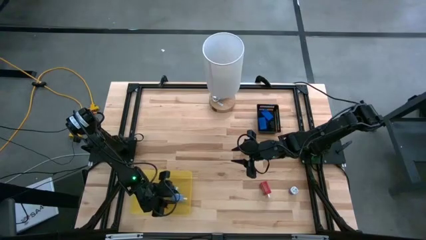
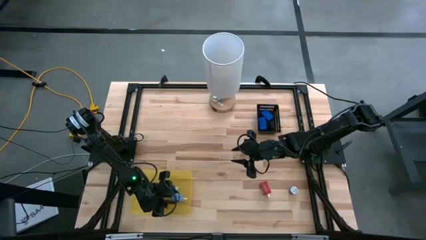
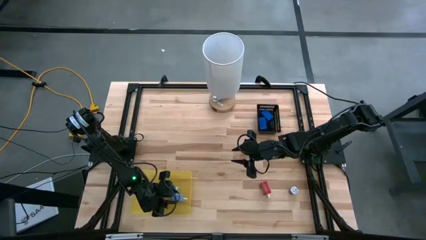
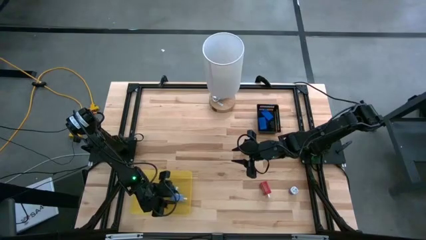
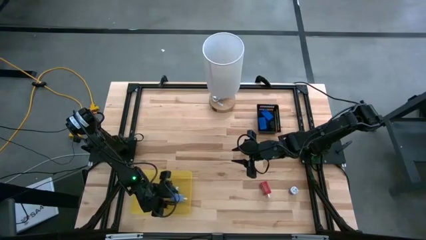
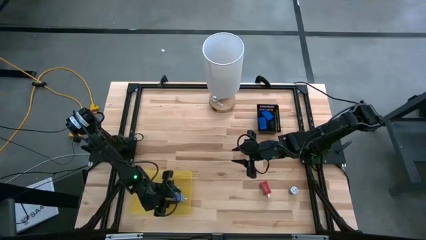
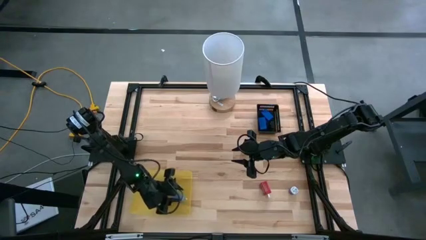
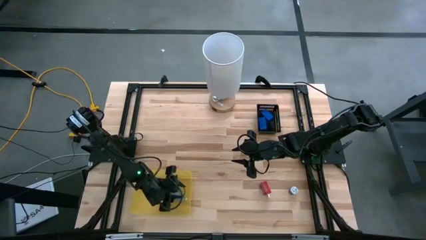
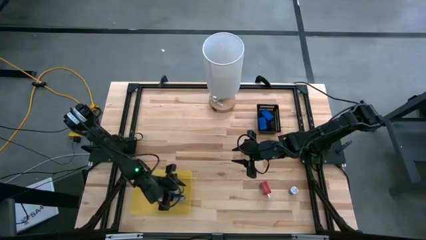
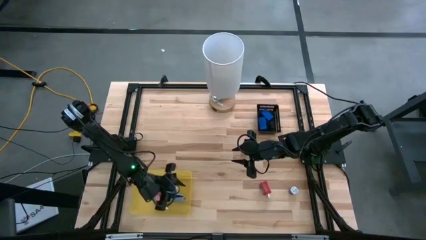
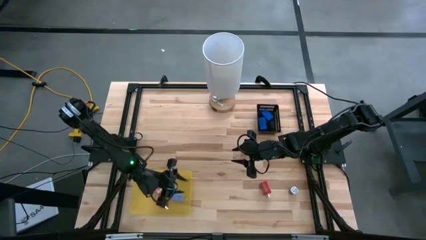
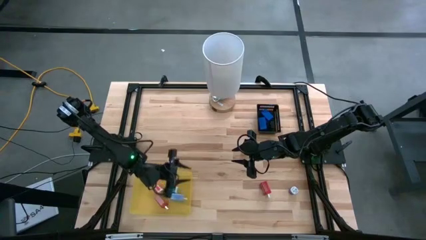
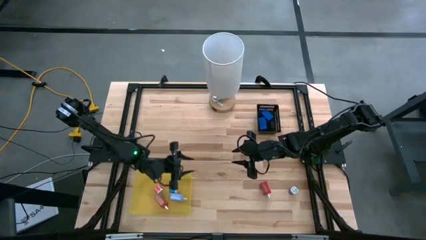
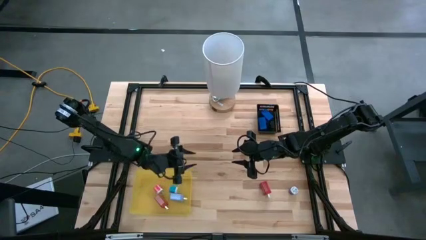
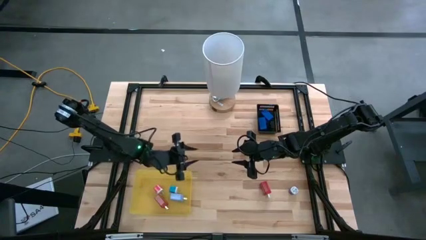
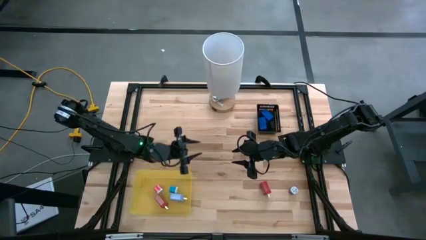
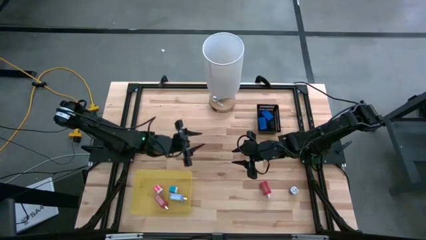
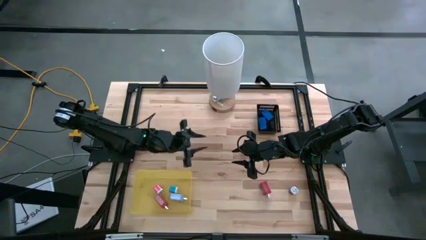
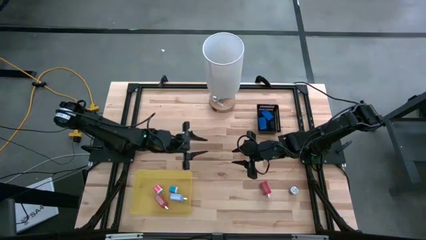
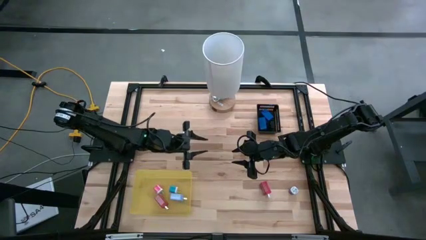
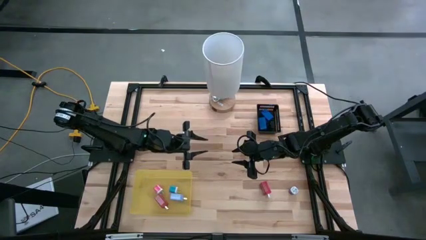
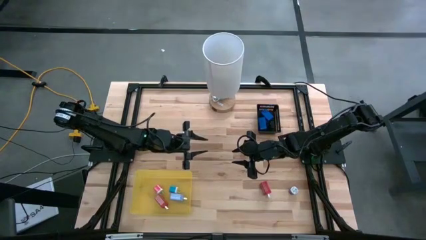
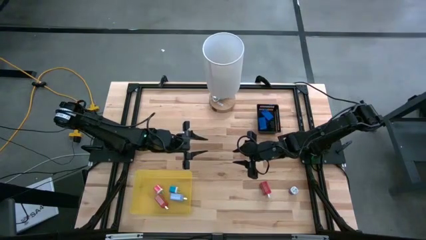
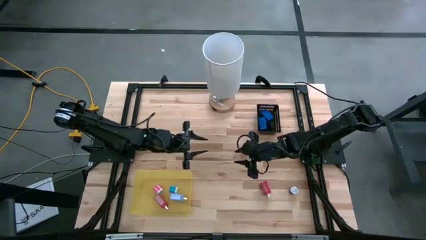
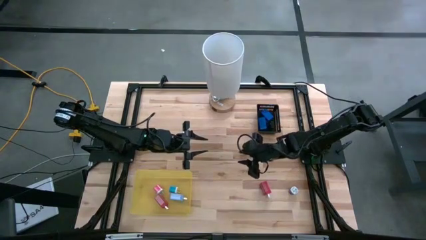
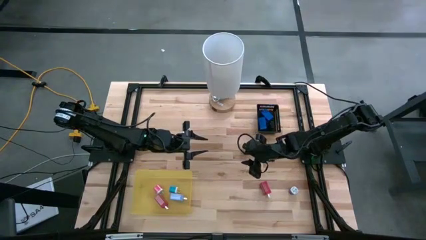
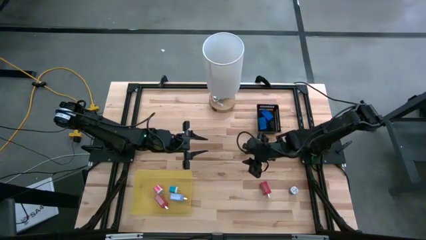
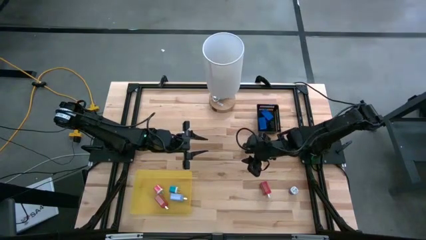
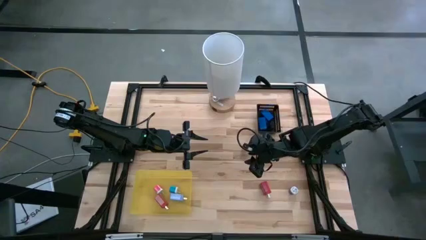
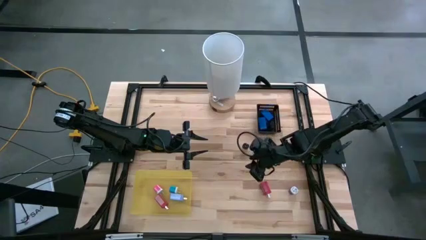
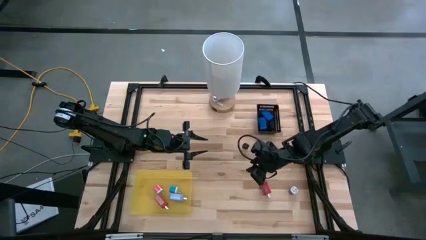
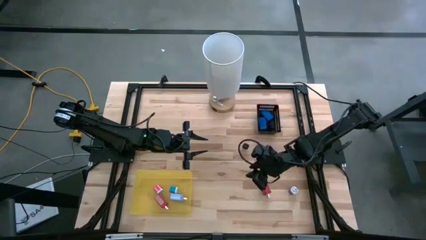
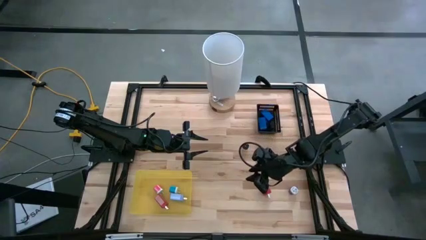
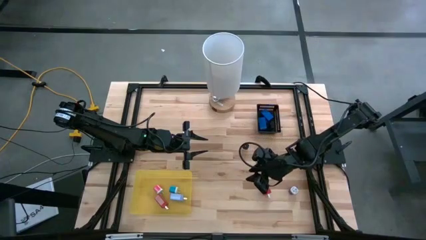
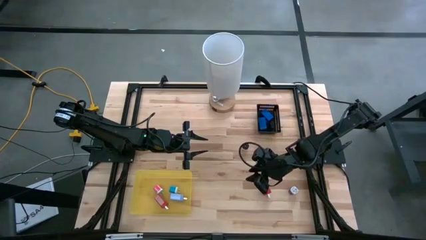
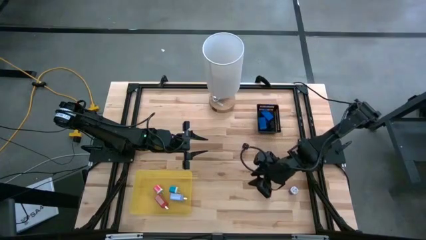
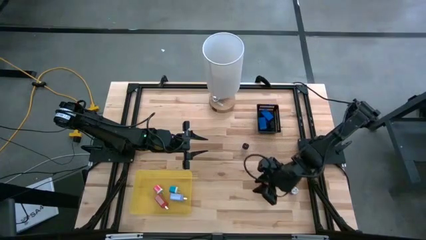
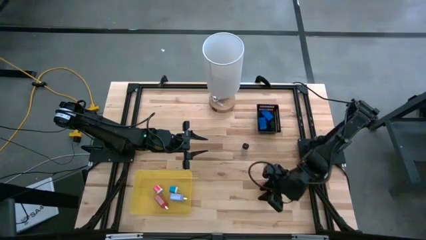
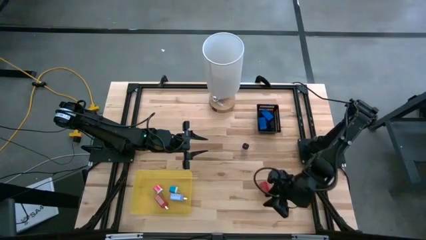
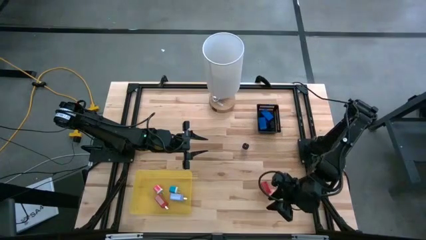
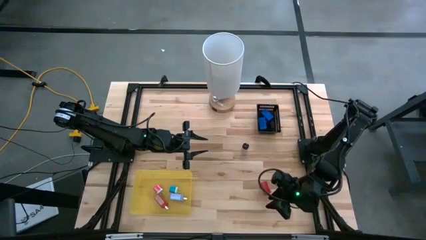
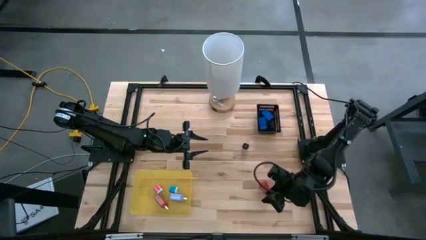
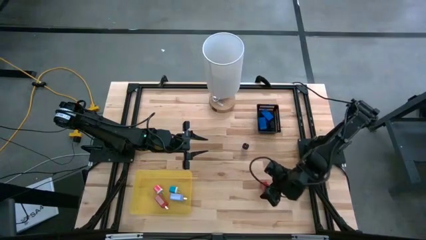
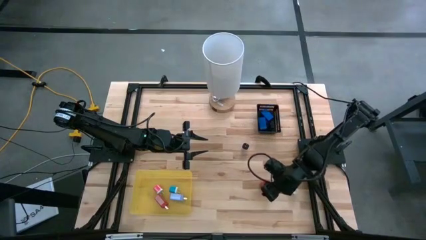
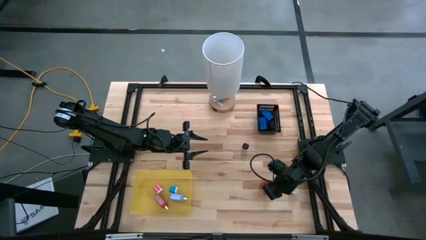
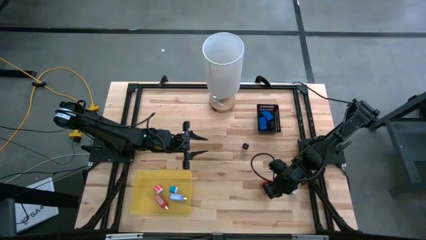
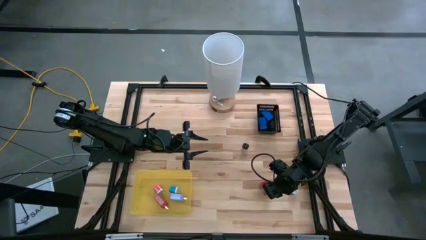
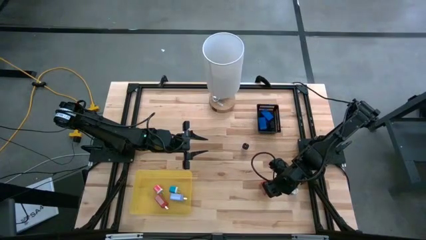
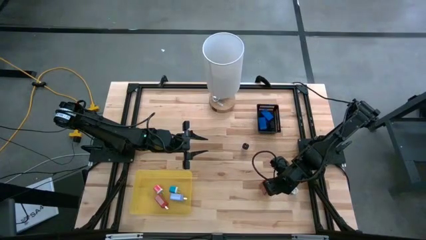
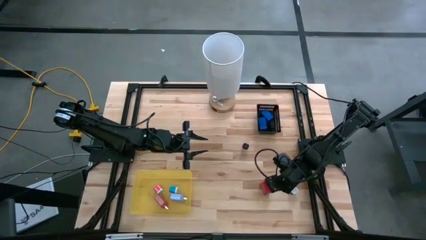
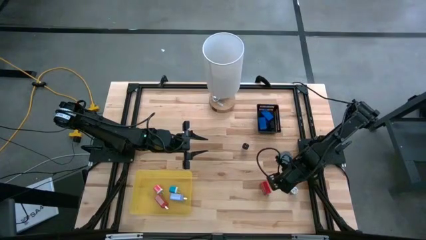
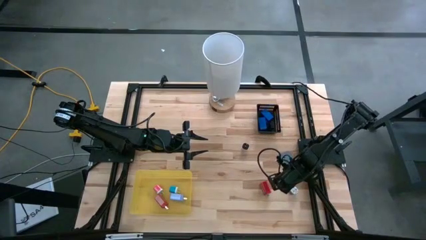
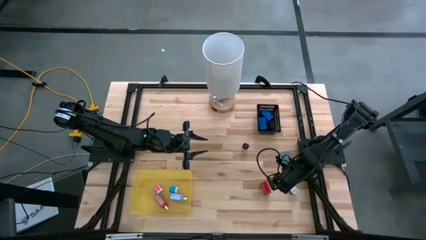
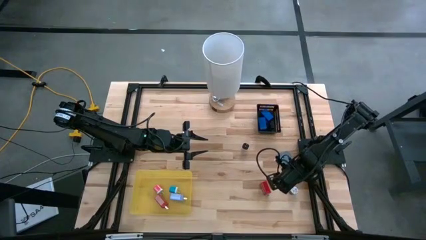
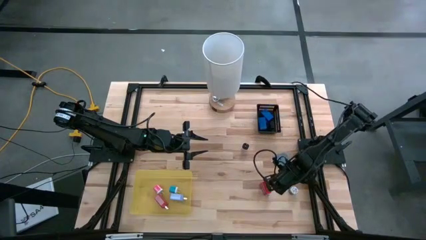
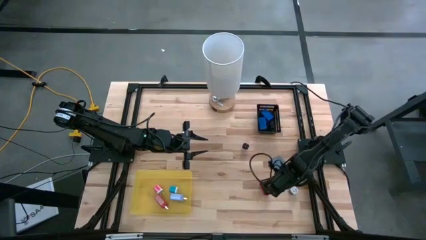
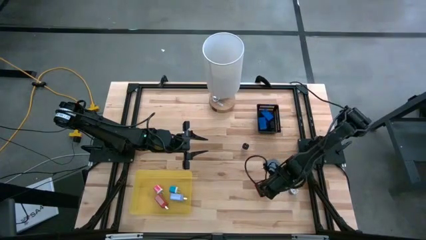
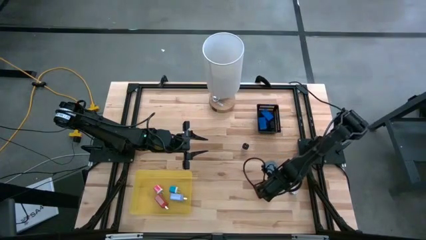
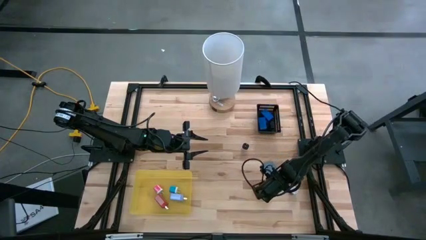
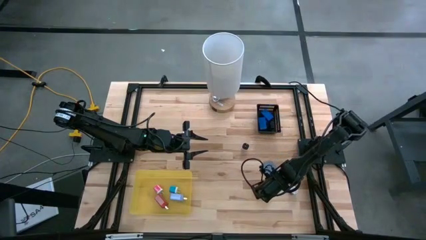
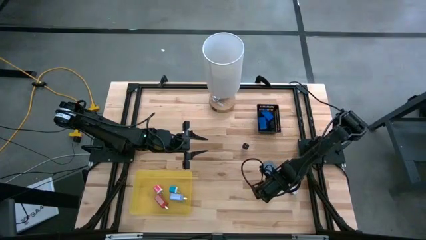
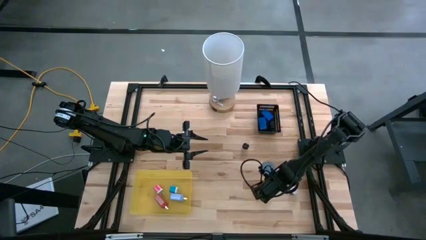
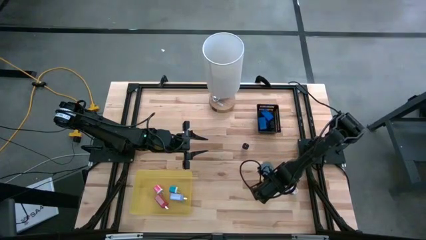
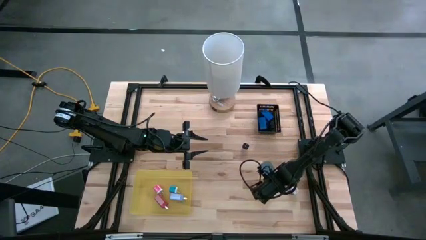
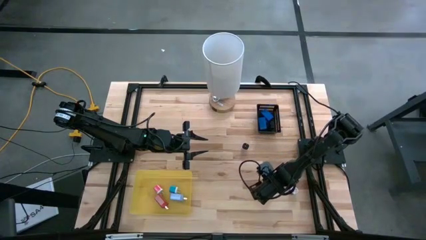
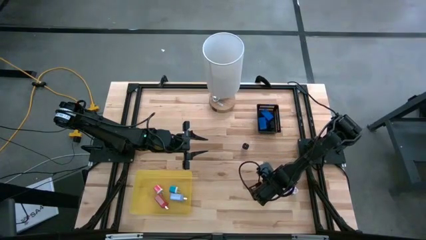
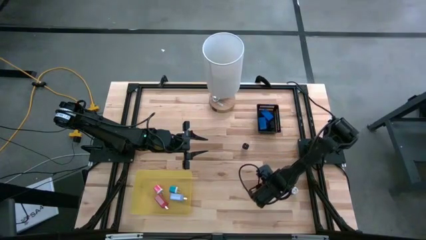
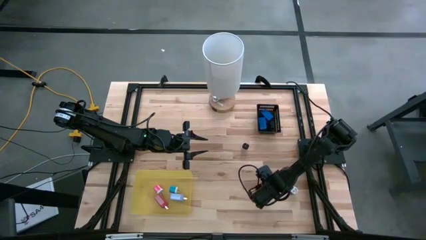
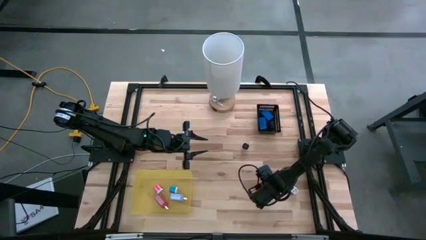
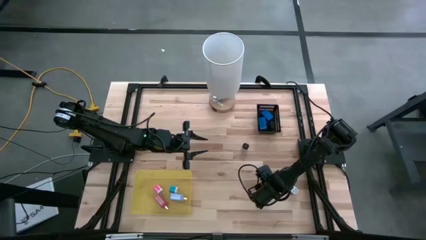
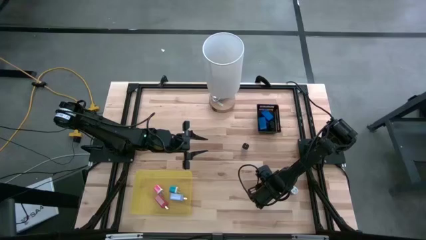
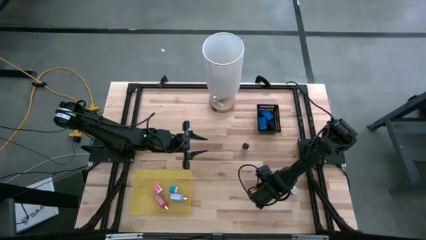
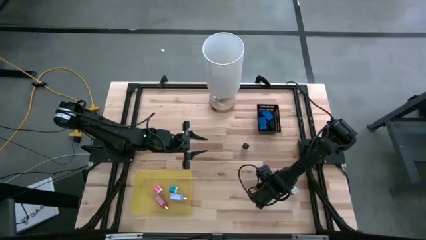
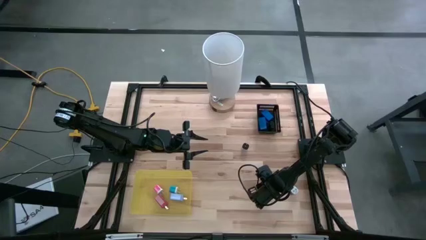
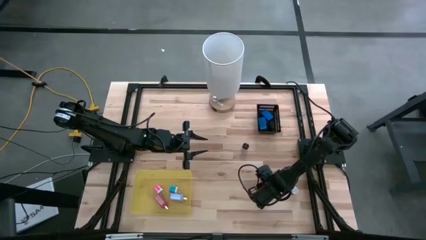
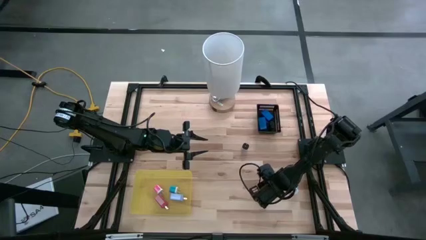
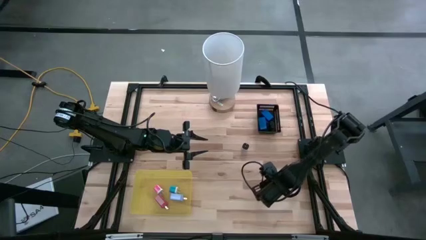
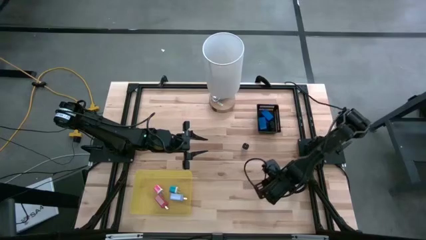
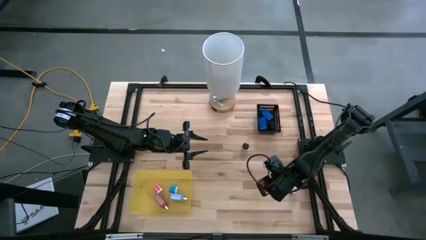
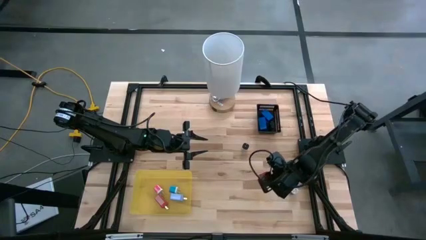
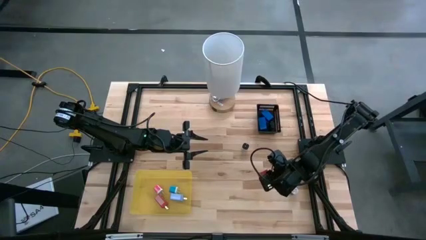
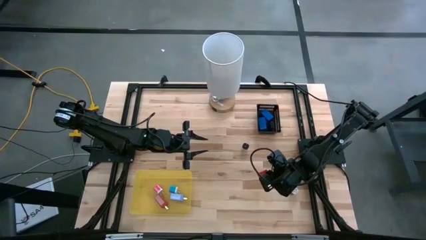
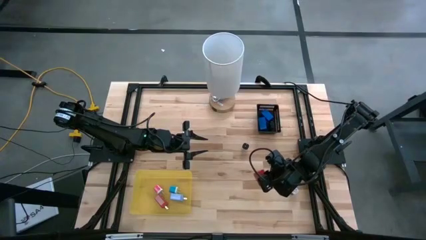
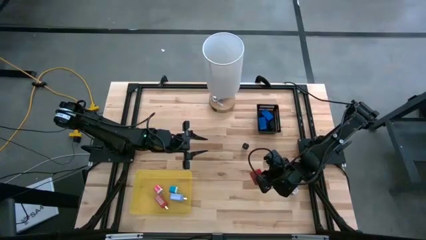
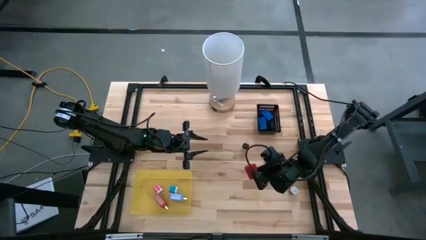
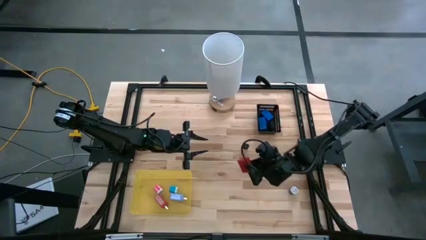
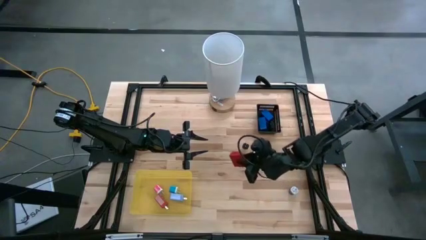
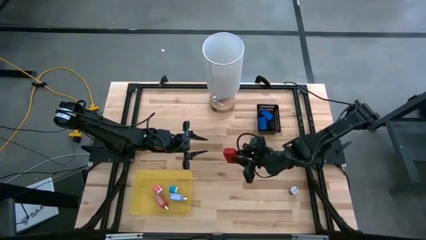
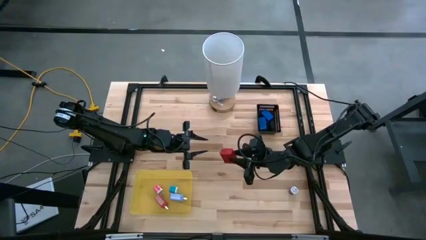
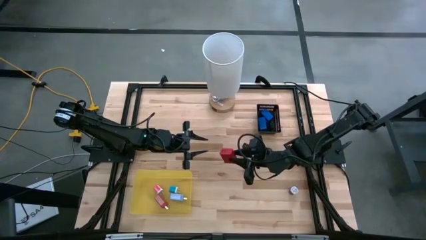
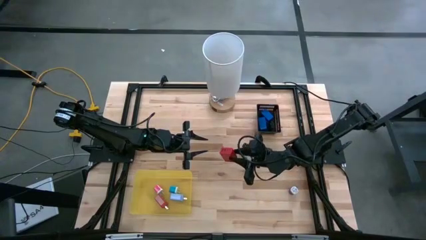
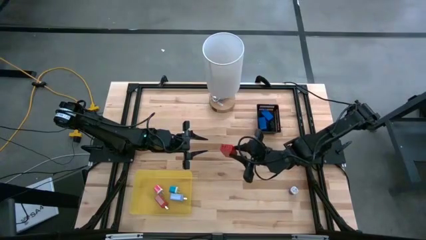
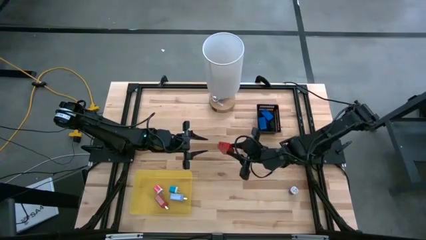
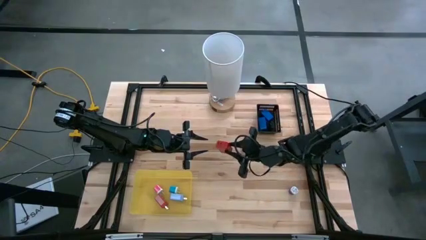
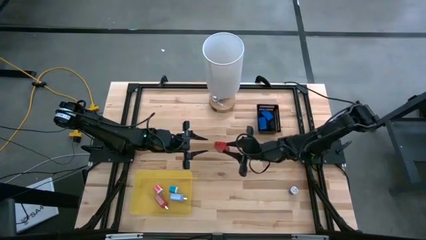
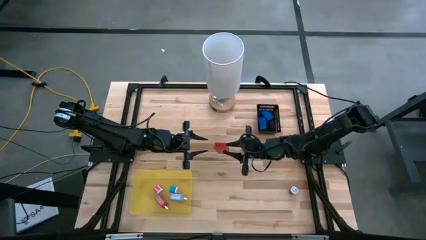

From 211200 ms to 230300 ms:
Task: Pick & Place Office items
Put the red charger adapter into the yellow bin
